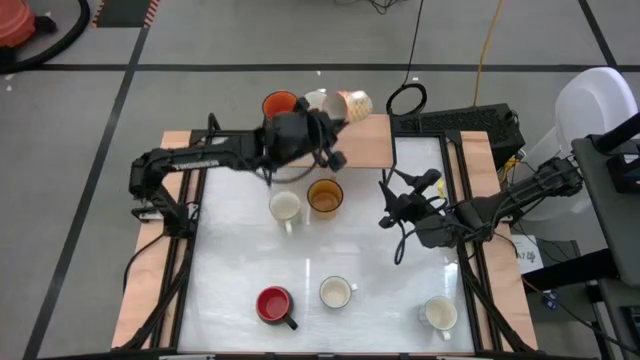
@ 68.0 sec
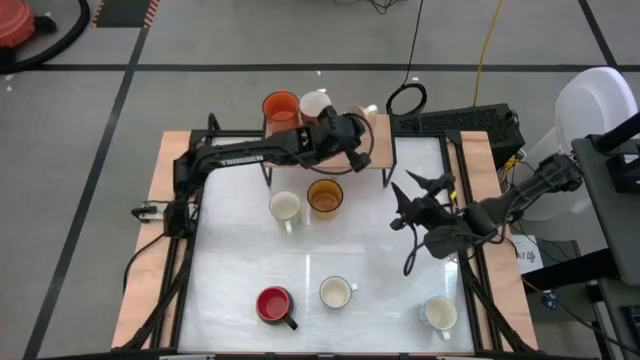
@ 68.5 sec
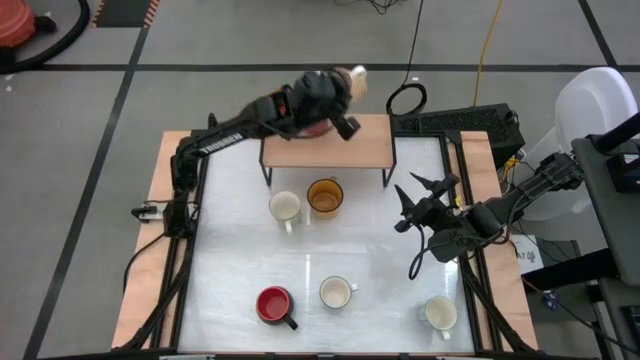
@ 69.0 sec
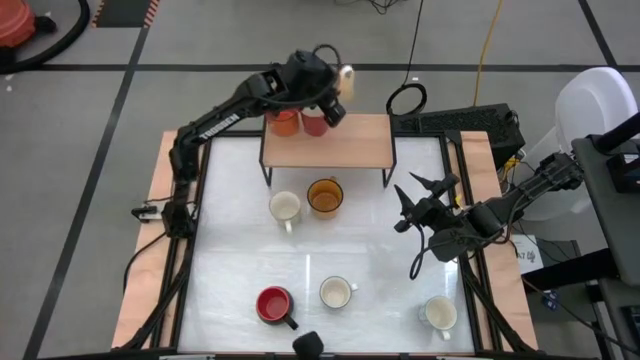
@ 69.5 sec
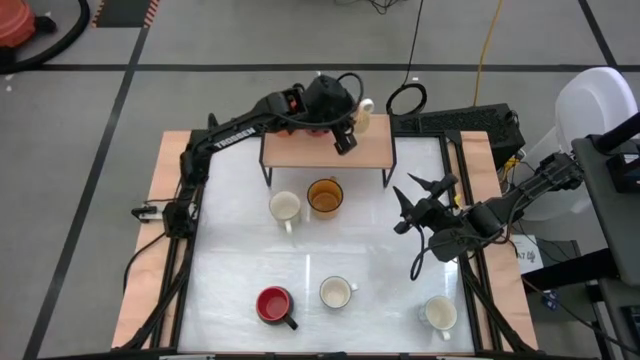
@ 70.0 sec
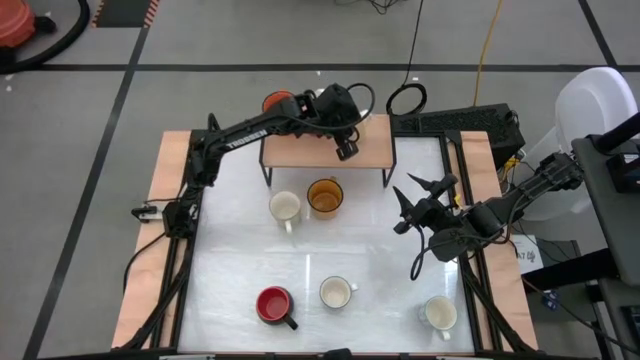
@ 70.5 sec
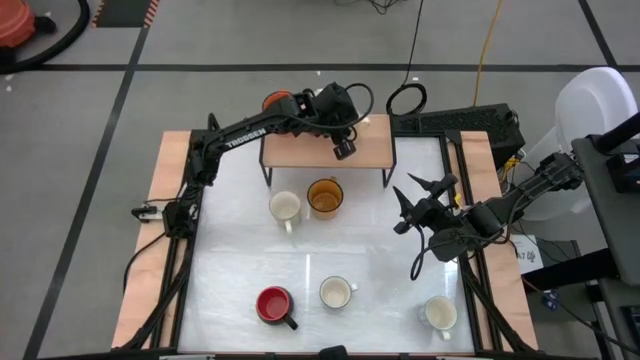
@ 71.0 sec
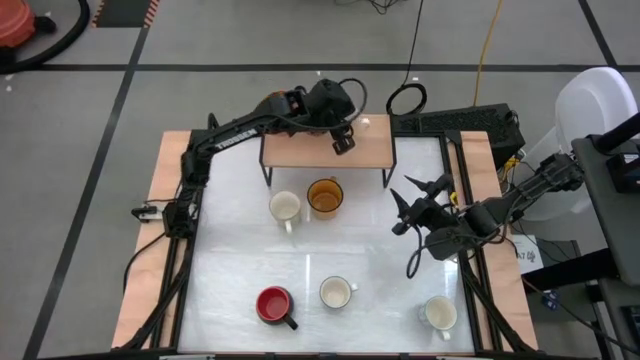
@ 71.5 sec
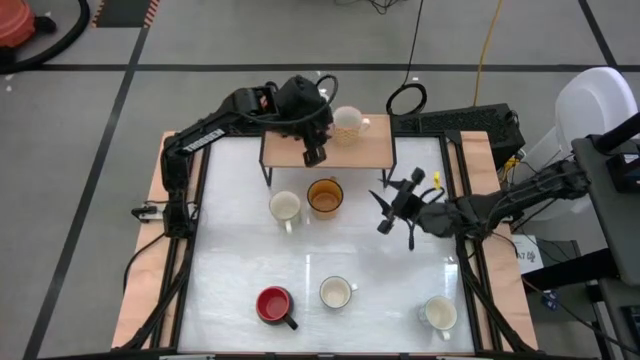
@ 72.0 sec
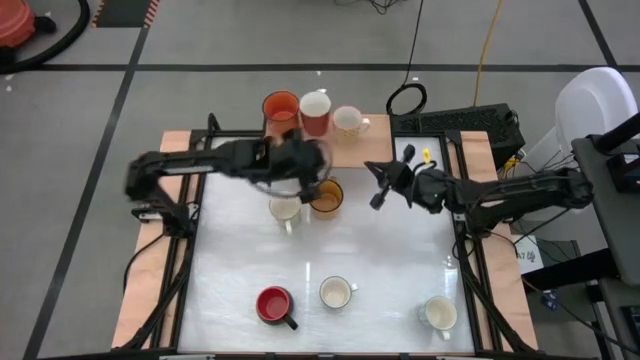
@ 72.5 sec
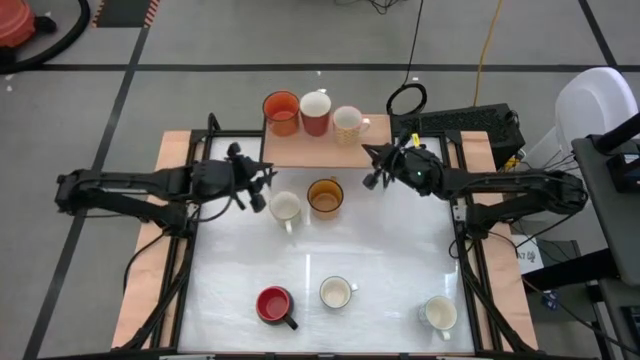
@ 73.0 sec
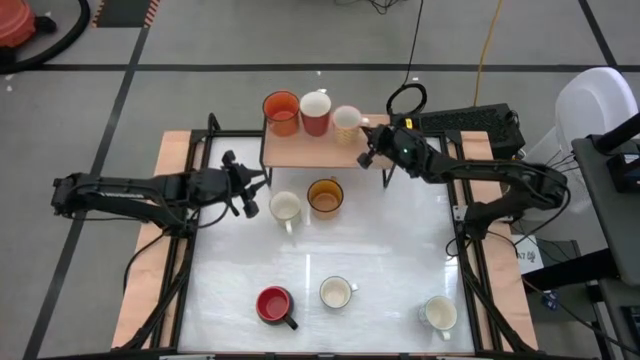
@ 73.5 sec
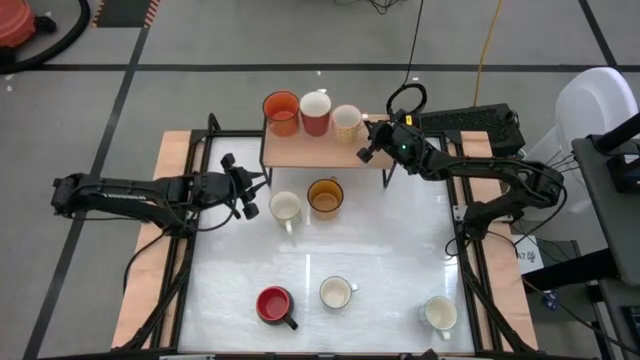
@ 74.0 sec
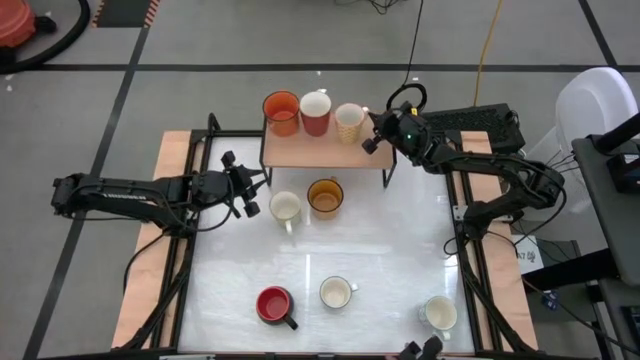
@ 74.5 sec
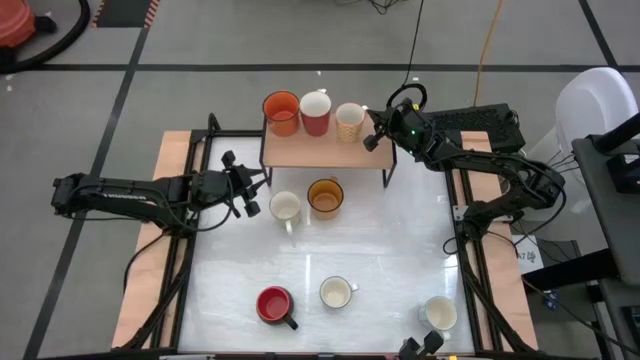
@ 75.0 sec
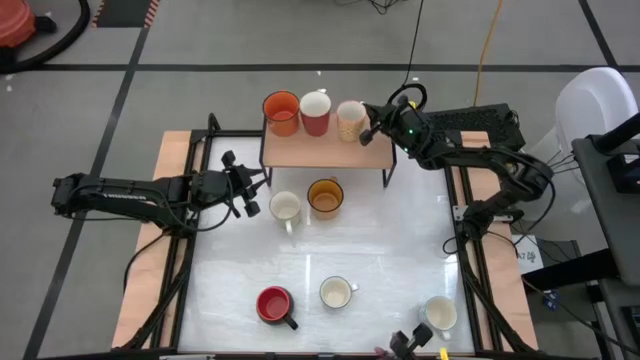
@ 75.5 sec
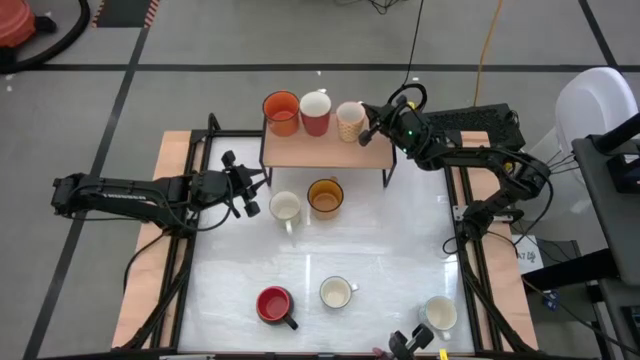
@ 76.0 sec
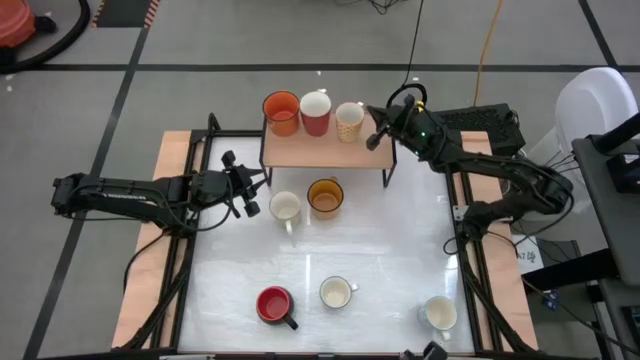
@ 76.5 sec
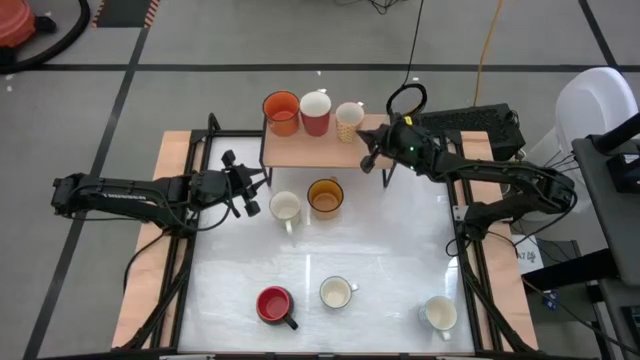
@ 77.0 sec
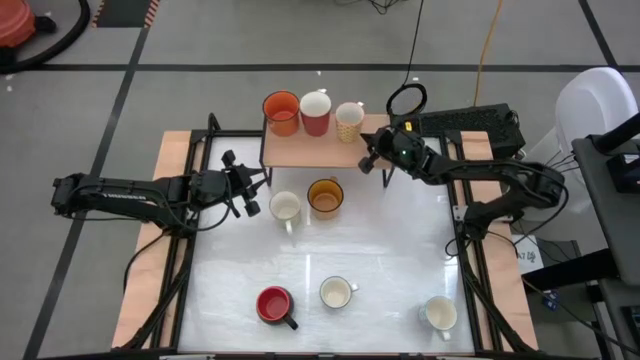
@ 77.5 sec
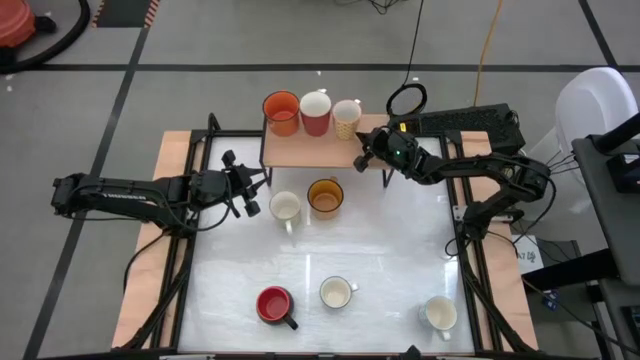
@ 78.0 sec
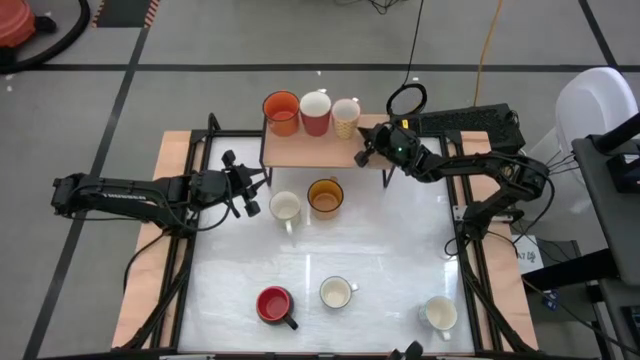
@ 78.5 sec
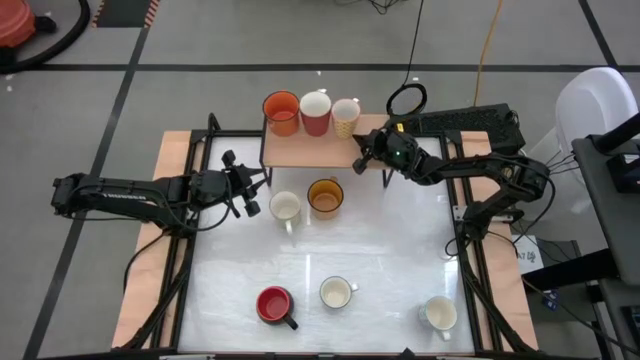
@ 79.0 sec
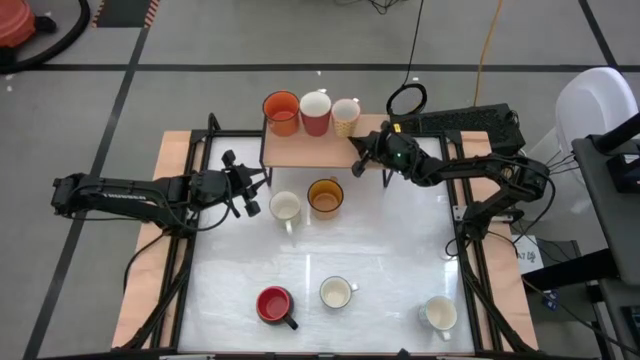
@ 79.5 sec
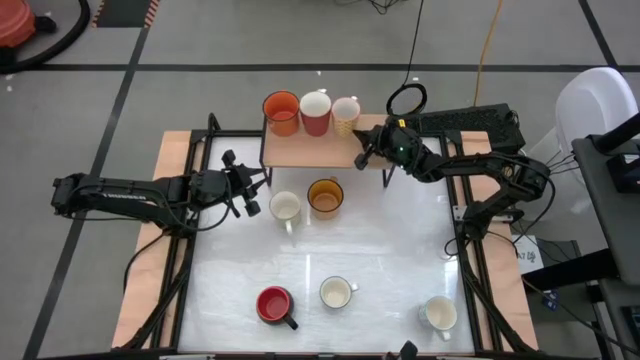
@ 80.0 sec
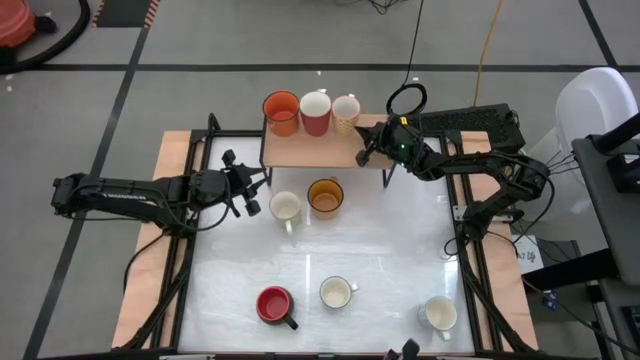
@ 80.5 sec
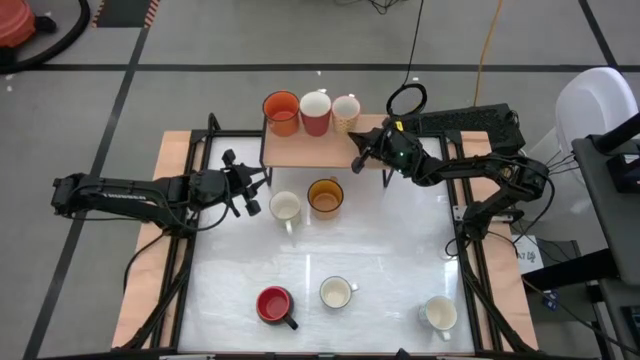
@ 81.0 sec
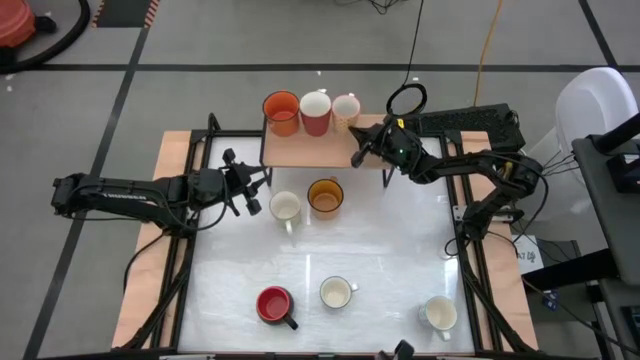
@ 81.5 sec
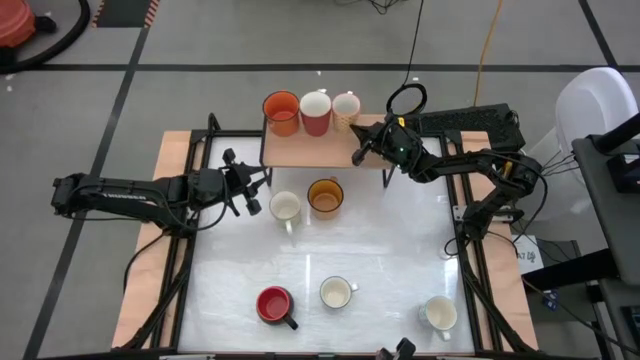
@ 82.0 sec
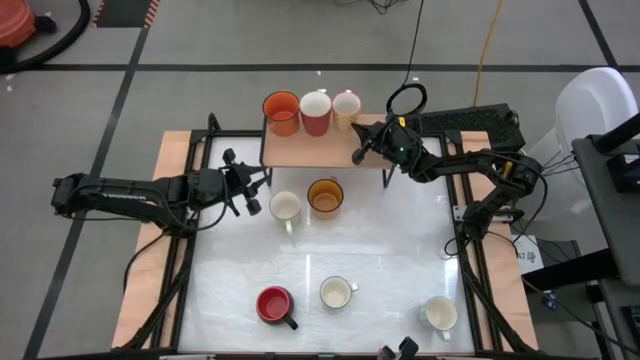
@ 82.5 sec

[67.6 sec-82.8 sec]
Task: Place coffee mugs
Put the yellow patterned mug on the shelf

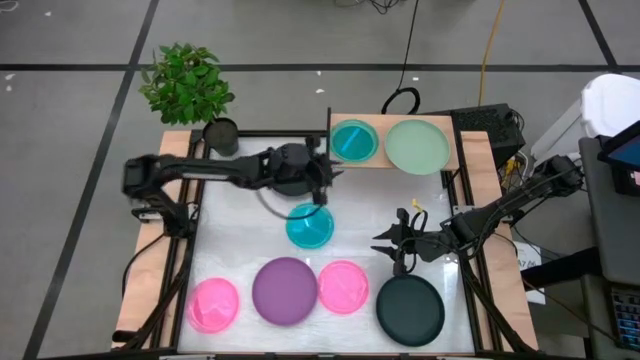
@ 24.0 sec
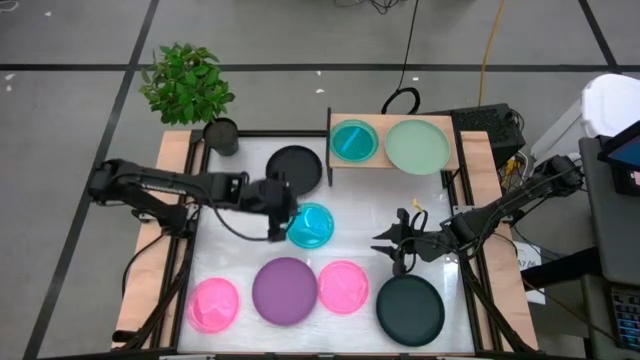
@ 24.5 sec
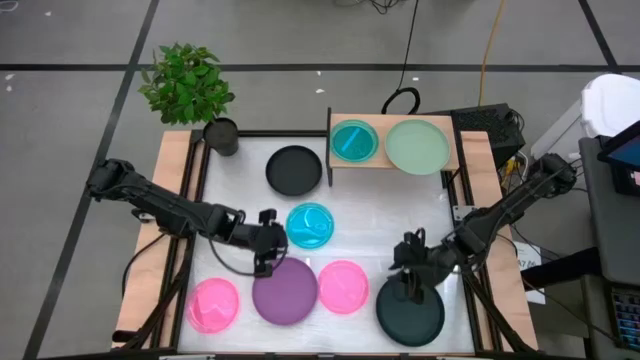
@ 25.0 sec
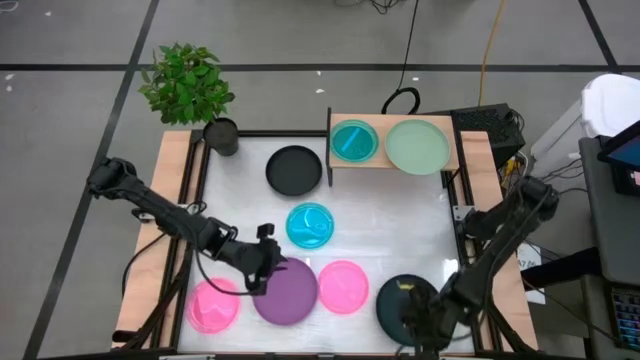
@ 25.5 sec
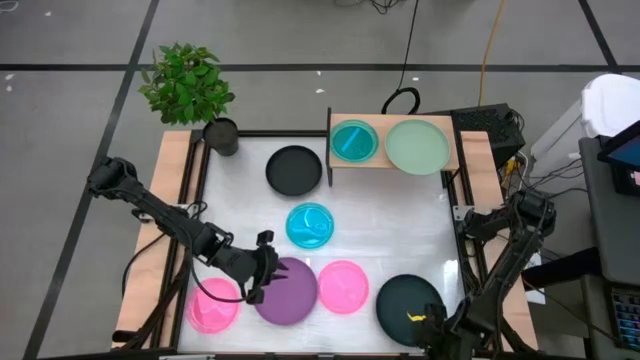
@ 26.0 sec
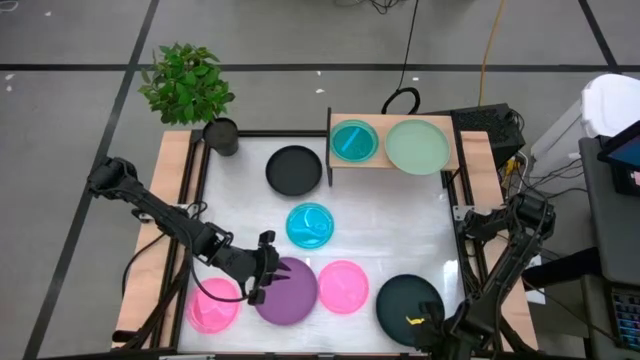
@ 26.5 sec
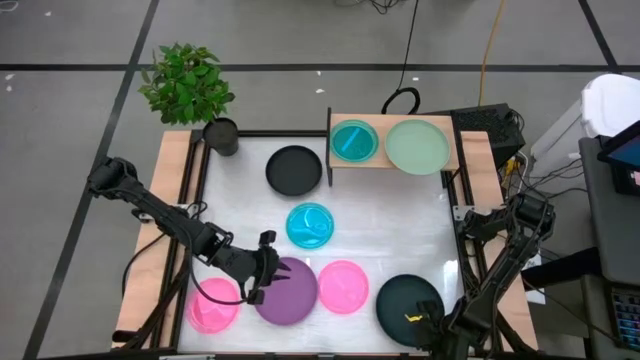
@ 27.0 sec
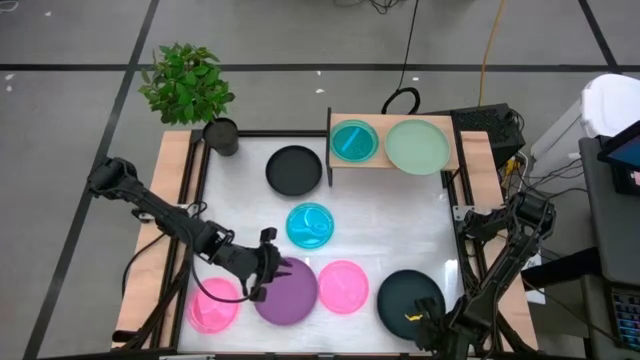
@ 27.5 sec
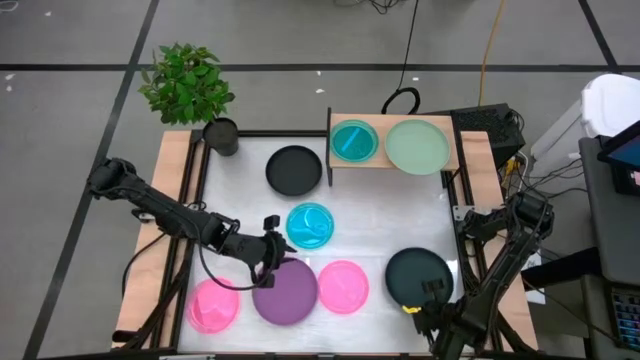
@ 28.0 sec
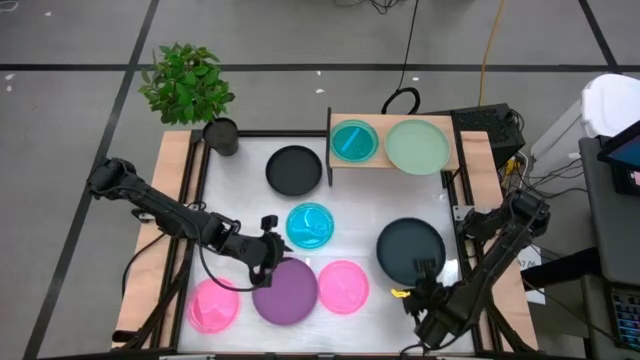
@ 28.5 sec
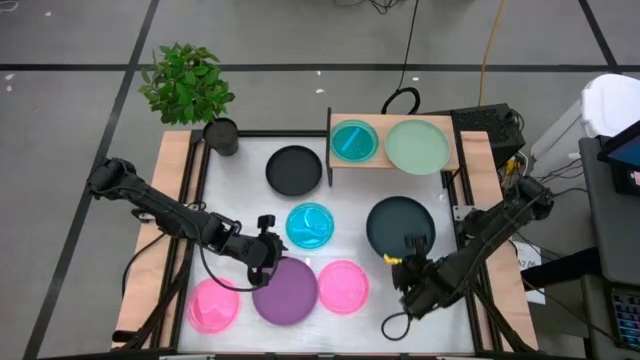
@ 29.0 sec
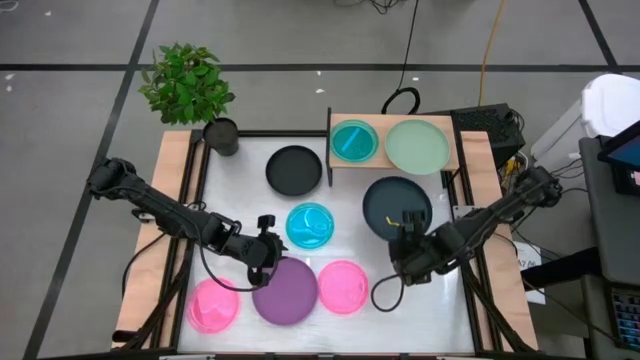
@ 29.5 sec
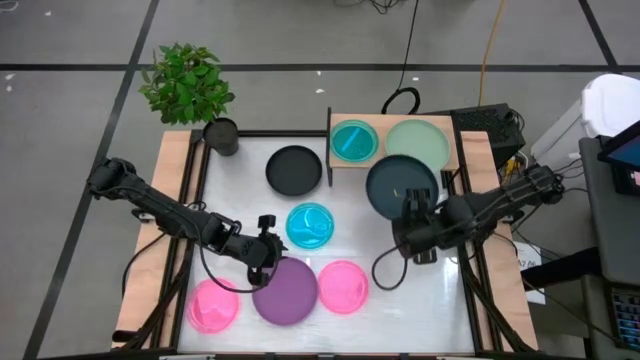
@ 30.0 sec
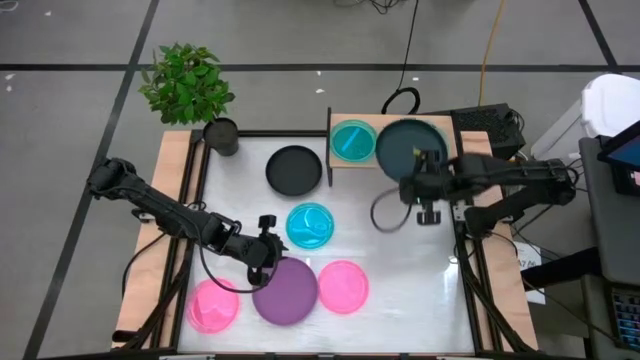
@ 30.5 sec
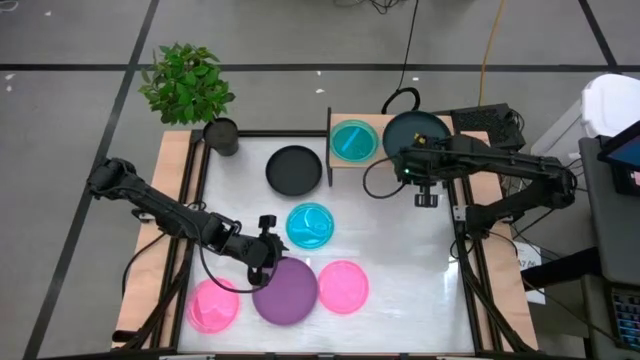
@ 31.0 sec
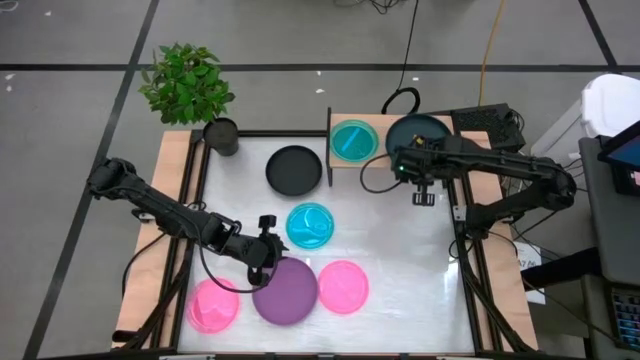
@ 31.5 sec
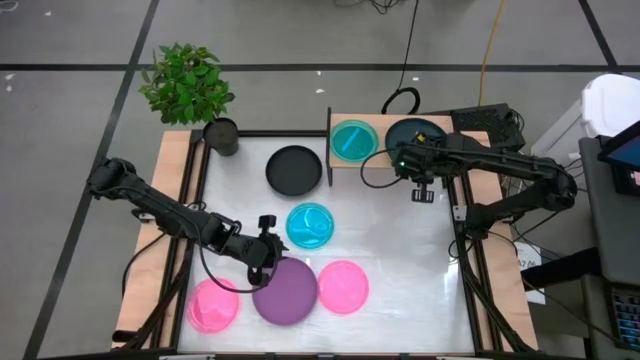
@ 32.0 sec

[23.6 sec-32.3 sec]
Task: Place and stack plates onto a shelf
Stack the bottom big black plate on top of the big green plate on the shelf
